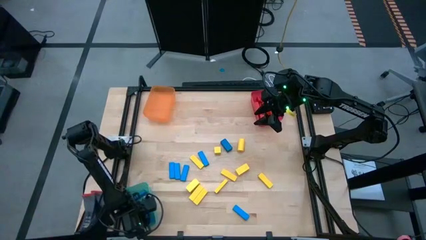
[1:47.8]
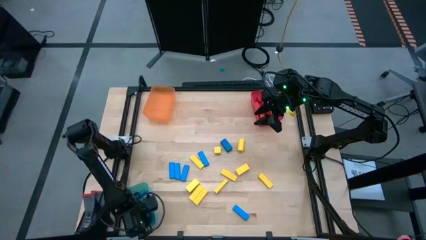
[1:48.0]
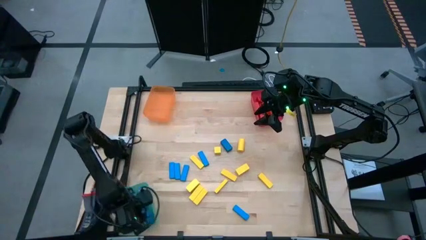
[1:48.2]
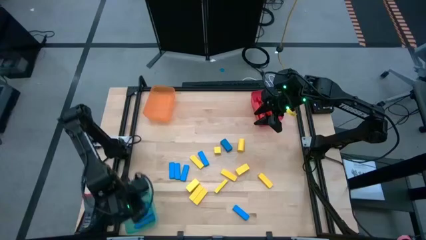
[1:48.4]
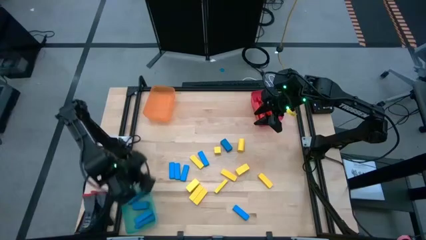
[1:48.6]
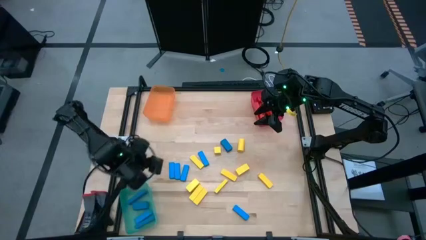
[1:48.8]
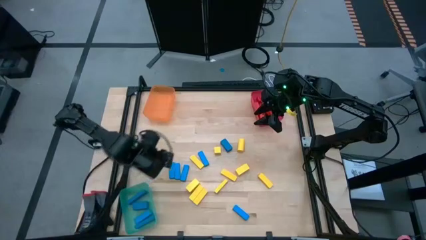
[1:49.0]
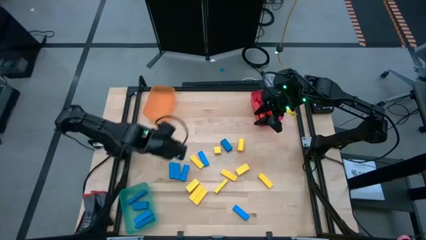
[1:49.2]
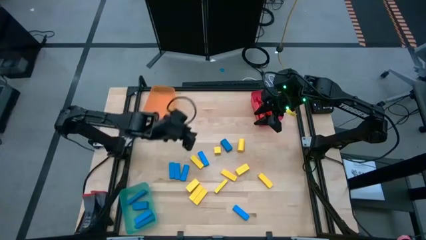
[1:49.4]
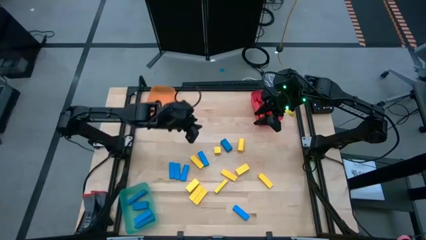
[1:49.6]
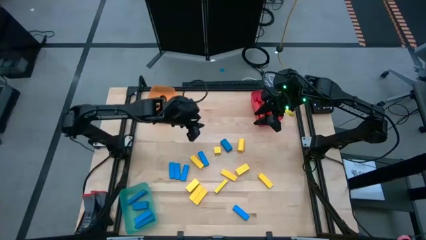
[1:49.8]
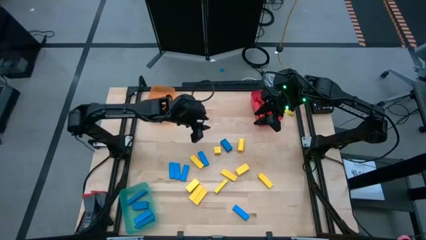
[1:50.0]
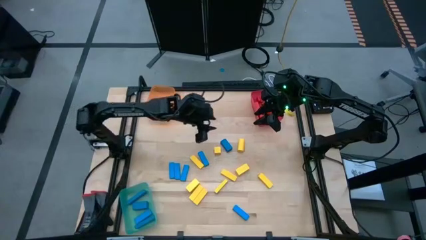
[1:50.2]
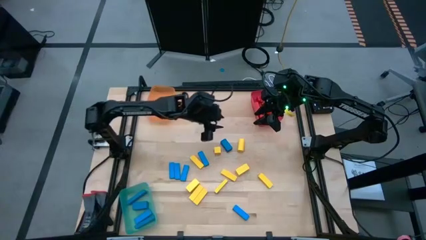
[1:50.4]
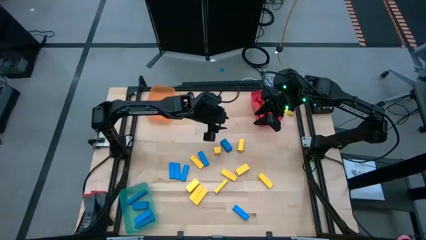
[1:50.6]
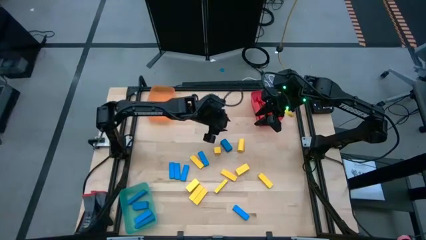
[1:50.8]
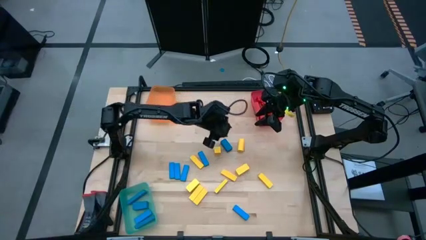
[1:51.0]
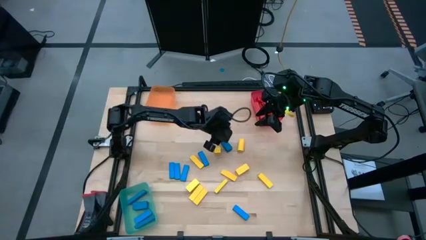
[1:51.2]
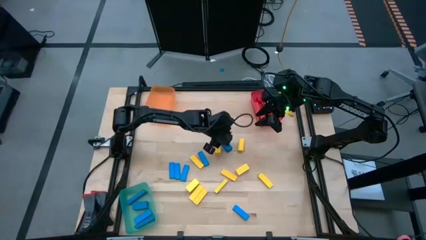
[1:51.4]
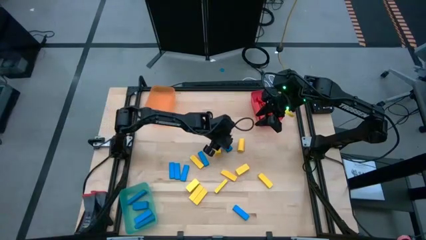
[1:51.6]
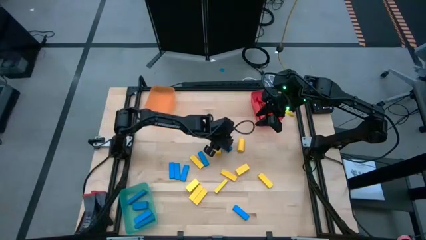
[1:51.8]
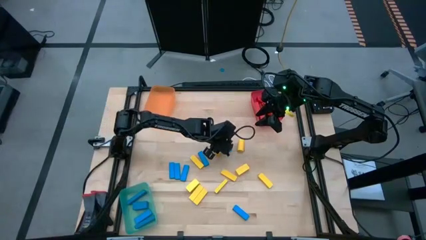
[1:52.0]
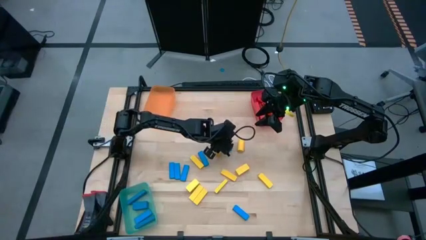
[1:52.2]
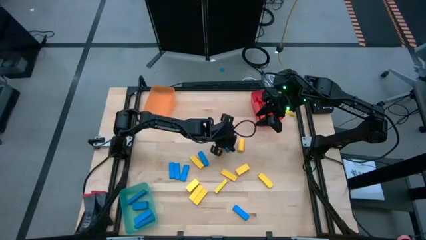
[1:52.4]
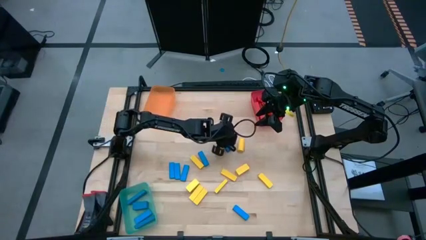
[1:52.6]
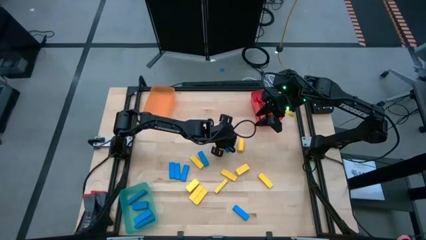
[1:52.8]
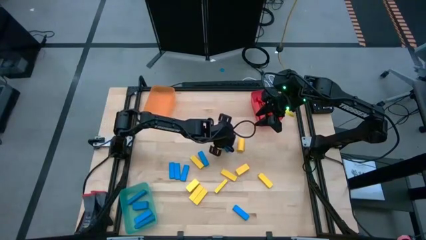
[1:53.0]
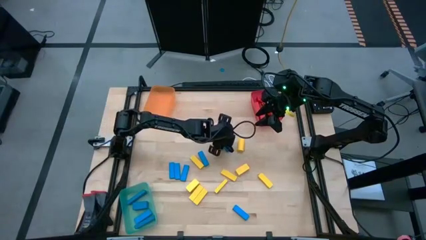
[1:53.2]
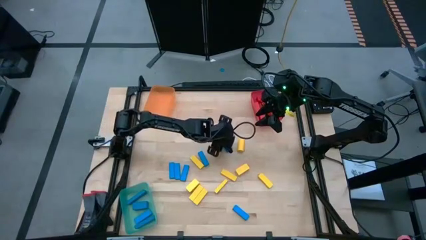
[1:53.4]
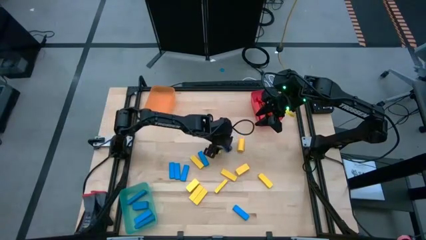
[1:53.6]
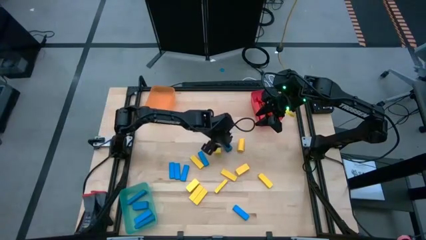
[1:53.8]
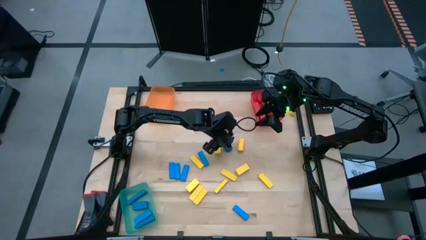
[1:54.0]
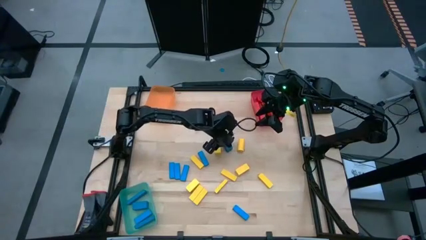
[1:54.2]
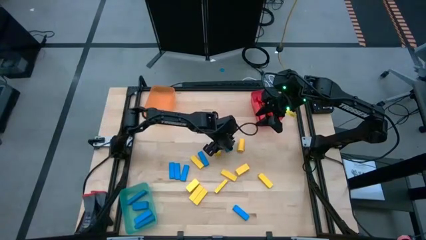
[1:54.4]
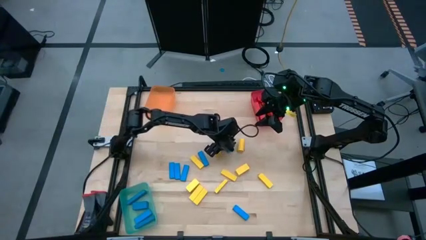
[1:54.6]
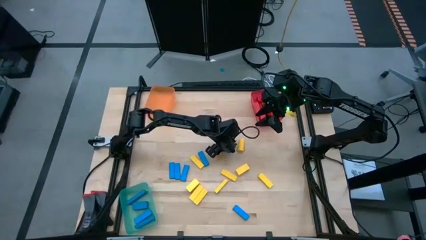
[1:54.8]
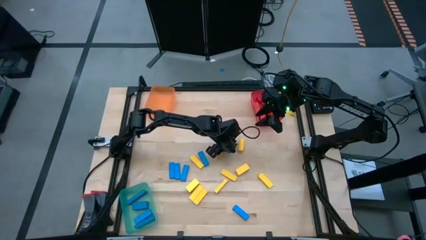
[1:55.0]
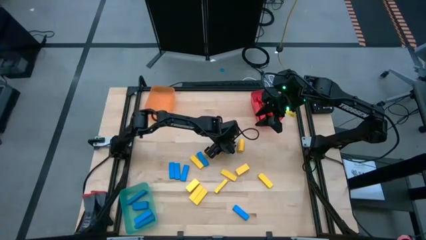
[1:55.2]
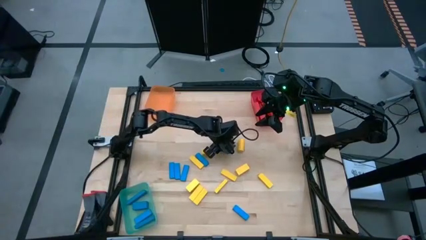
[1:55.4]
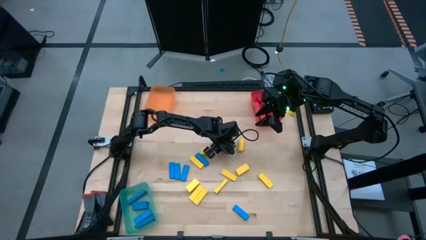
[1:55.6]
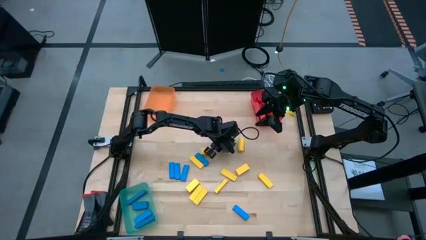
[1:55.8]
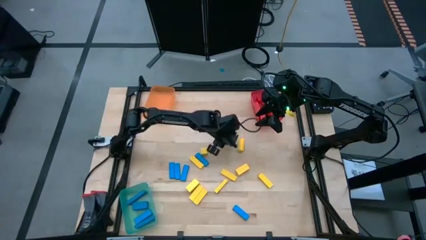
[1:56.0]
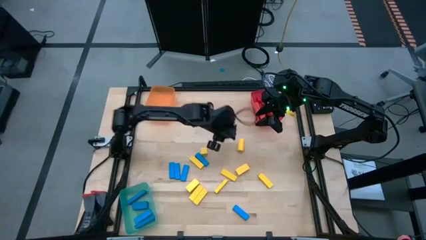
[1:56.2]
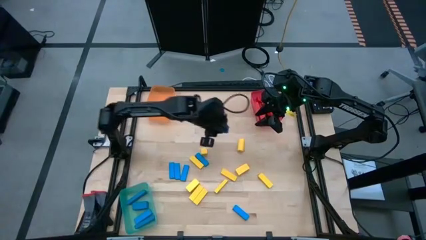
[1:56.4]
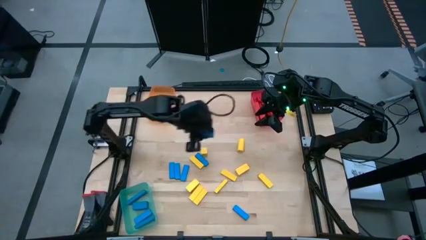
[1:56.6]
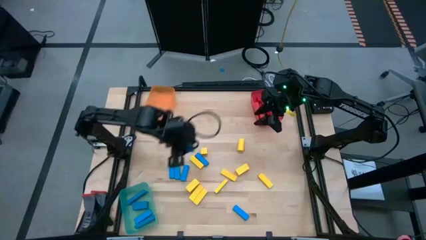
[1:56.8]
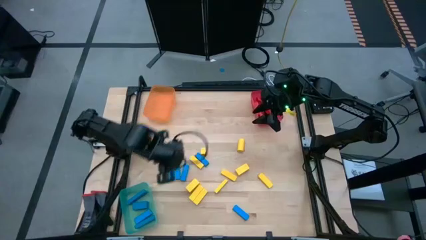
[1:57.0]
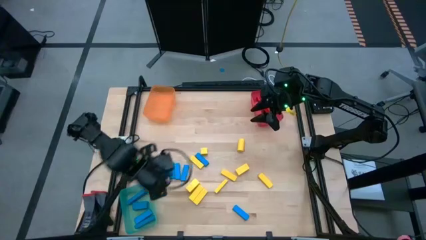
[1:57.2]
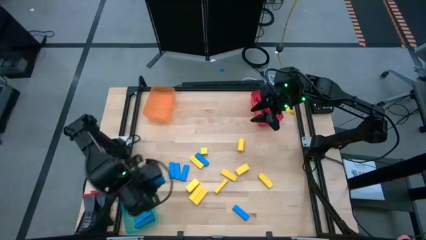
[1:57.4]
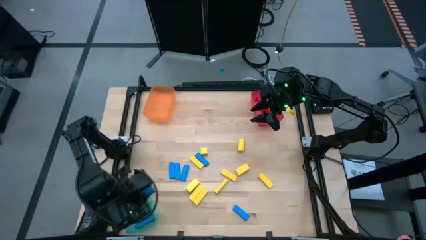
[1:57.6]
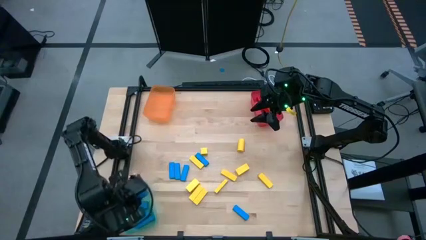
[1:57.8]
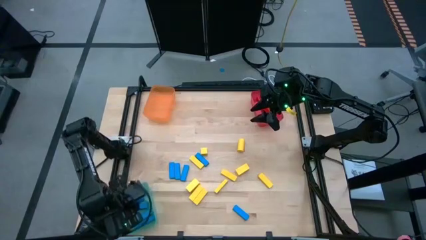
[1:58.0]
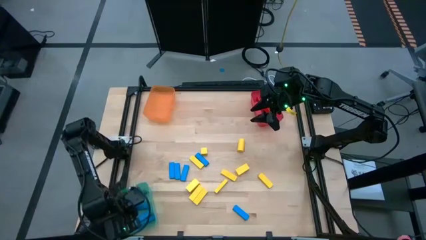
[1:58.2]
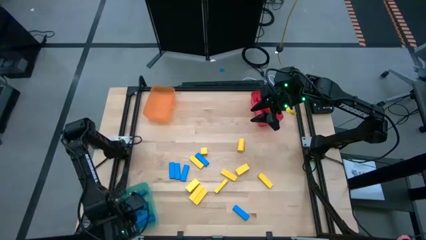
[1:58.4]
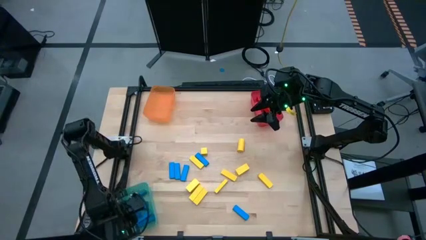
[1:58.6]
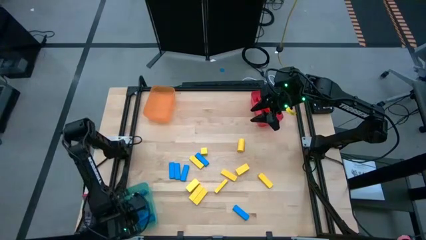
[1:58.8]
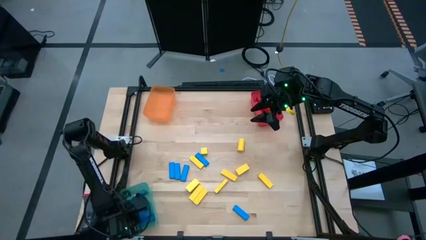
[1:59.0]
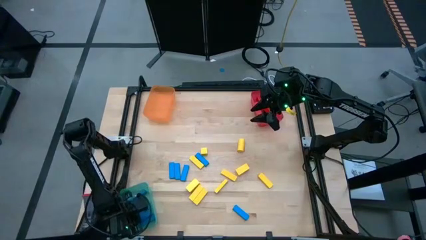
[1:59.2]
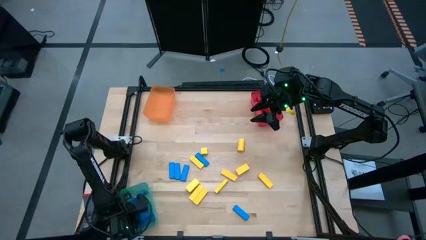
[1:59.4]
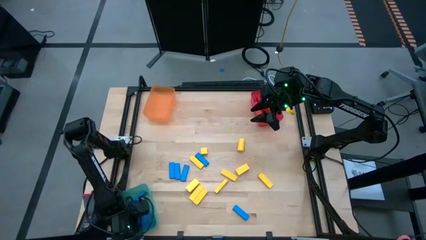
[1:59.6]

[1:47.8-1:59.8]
Task: Sort blocks
Put the blue block into the green transparent bin

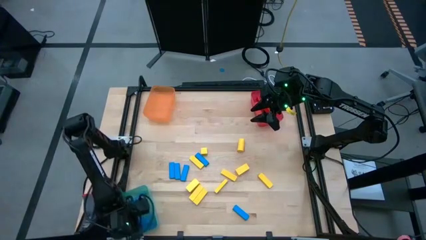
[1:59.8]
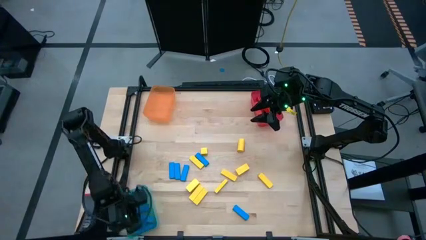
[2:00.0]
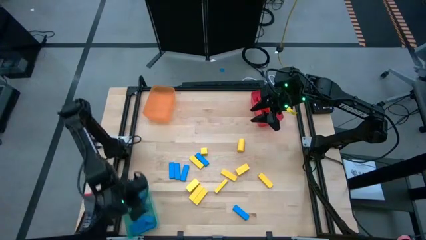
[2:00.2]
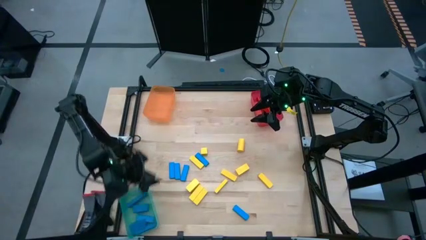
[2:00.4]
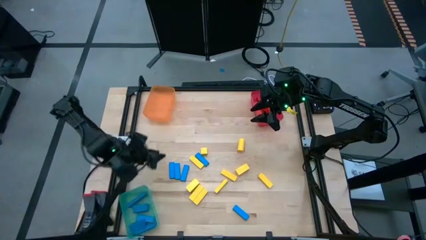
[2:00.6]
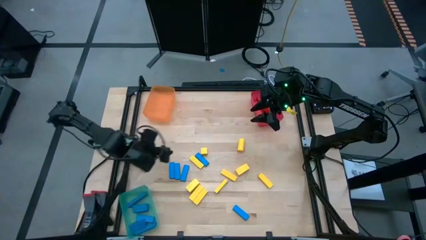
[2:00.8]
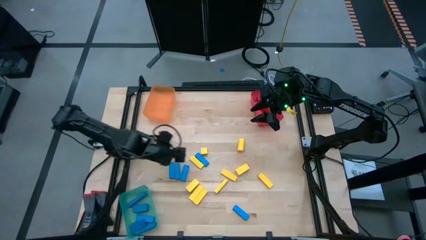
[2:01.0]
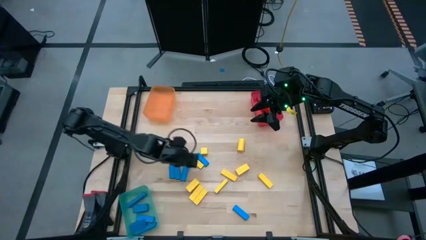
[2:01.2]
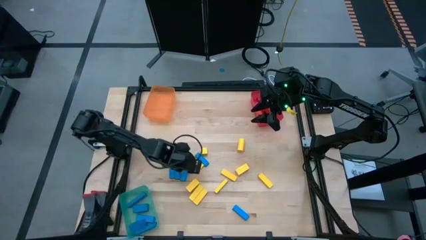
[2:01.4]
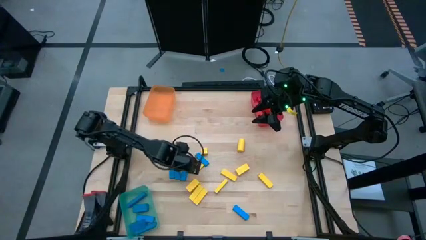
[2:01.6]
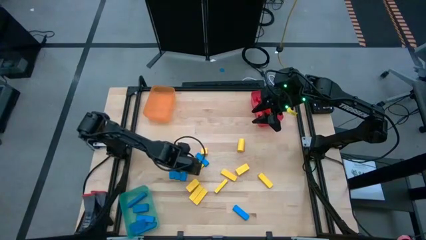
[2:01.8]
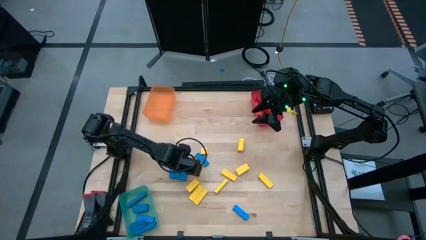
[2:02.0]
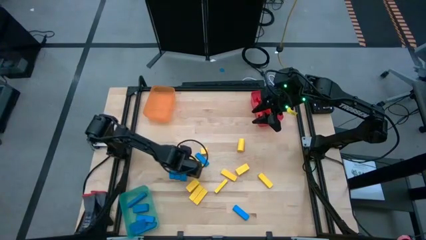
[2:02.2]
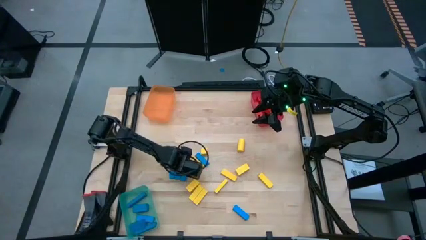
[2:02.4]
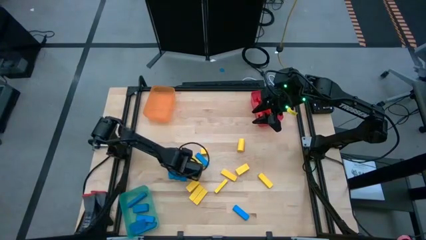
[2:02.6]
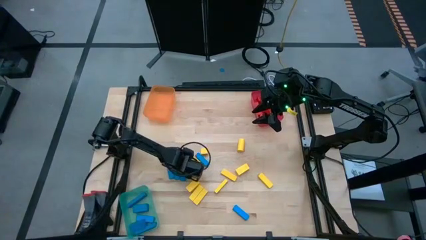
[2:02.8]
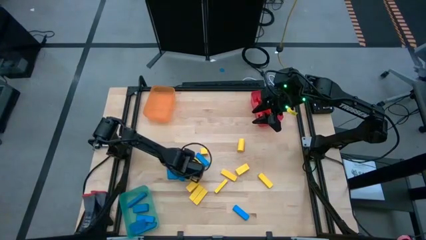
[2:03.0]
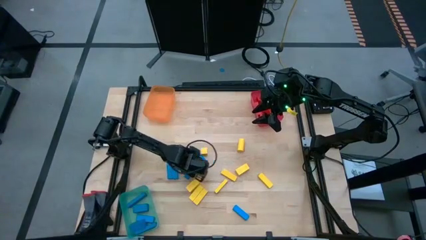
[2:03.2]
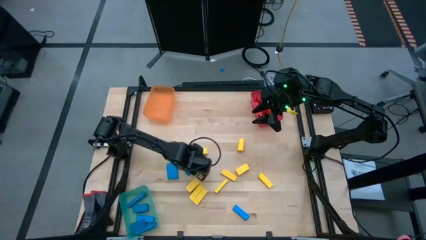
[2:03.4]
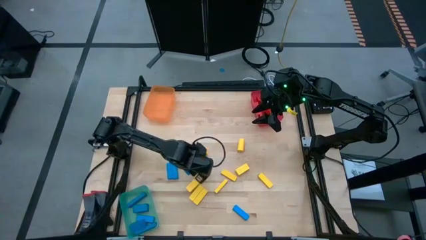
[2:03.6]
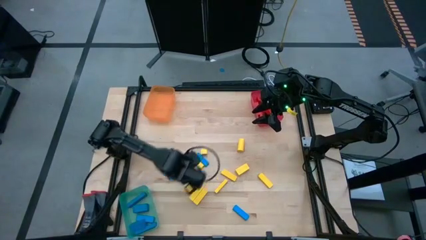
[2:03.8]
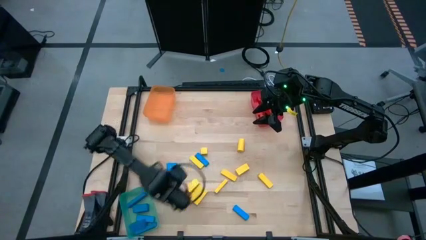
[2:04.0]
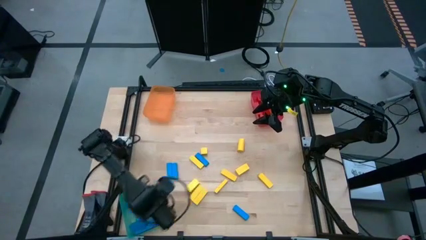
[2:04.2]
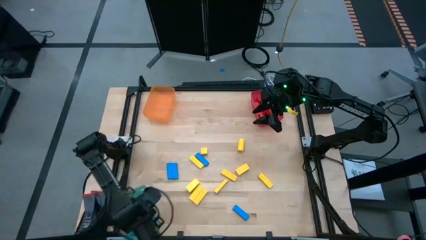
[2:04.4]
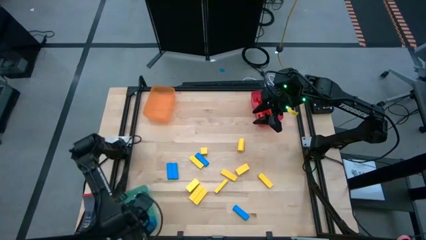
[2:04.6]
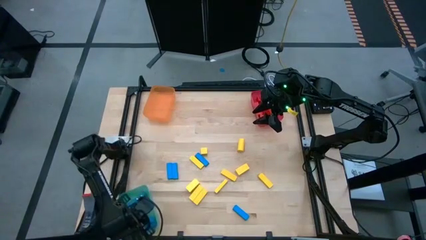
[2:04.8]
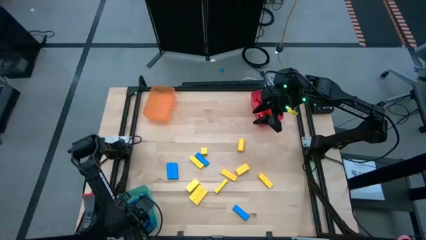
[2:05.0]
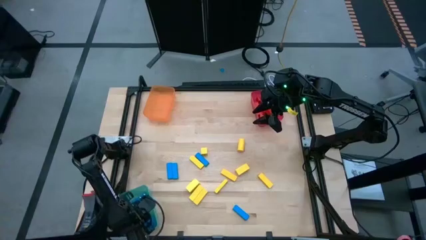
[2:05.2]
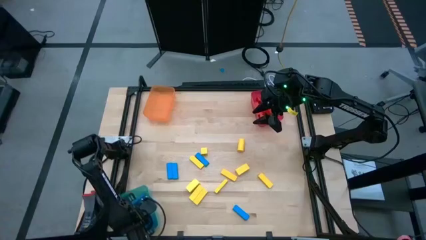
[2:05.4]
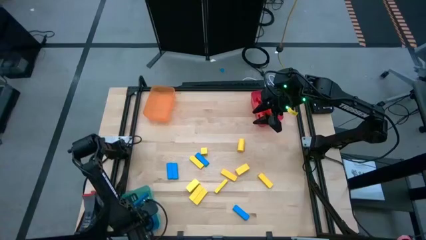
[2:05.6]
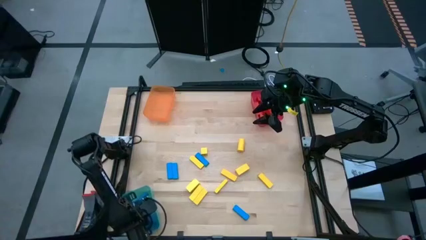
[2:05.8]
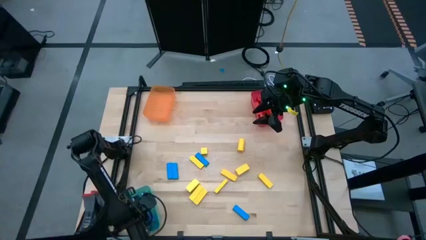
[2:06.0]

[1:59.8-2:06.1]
Put the blue block into the green transparent bin
